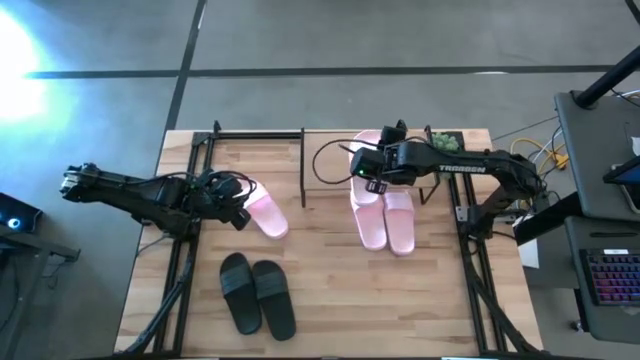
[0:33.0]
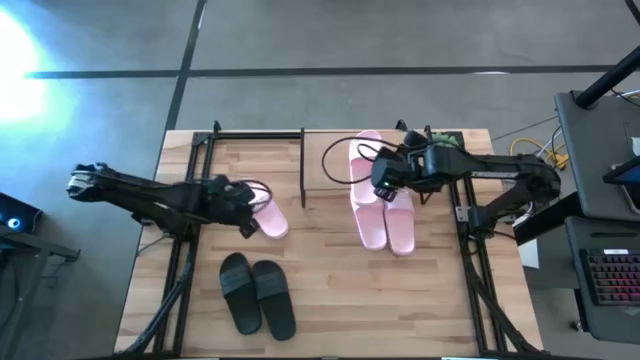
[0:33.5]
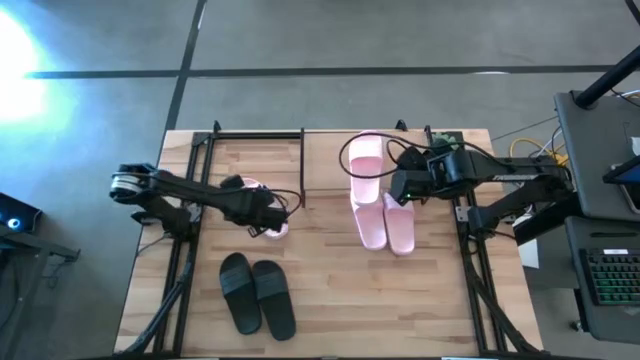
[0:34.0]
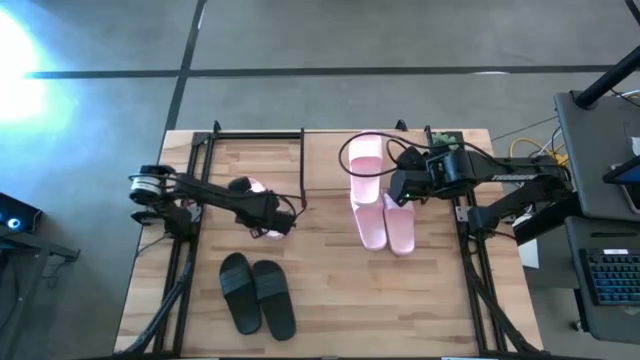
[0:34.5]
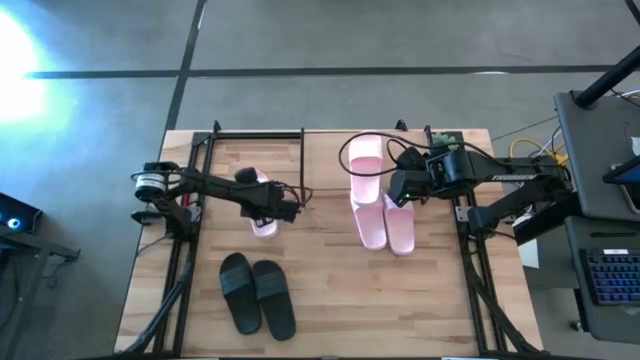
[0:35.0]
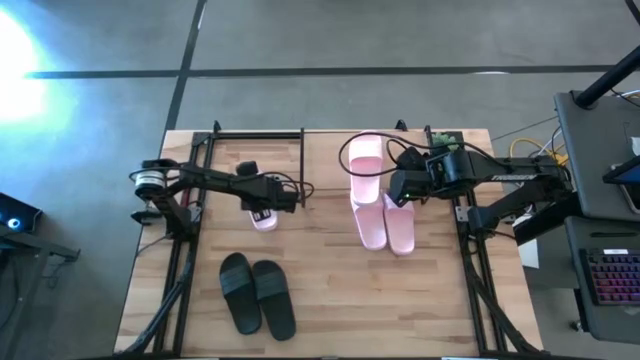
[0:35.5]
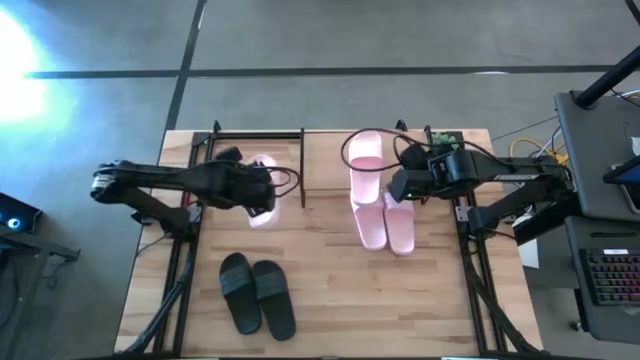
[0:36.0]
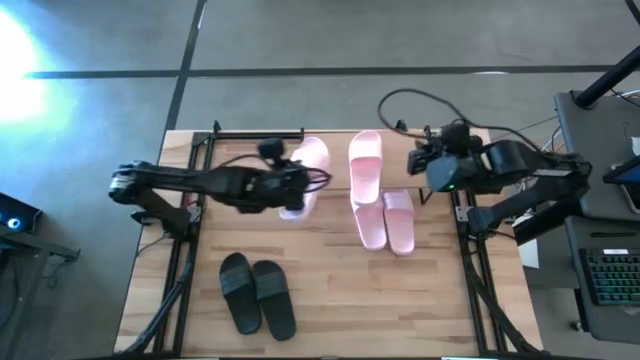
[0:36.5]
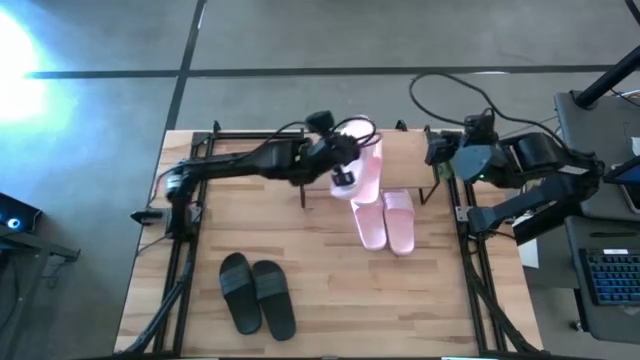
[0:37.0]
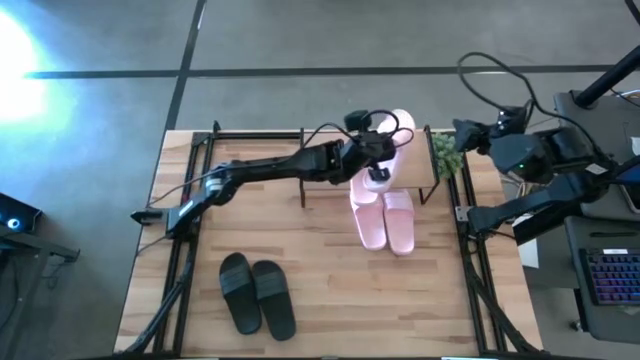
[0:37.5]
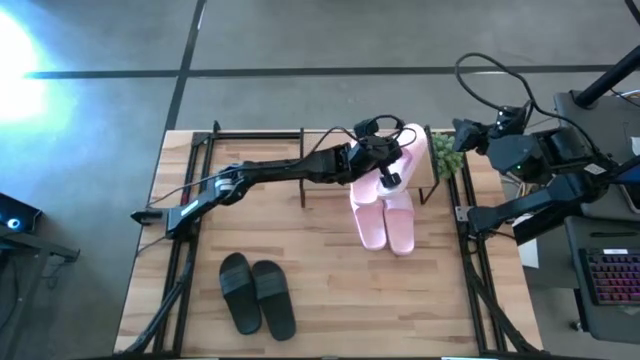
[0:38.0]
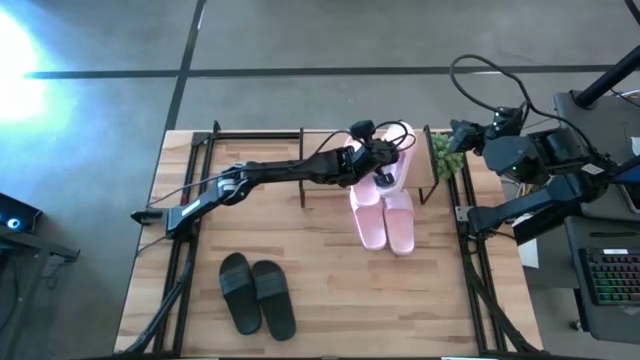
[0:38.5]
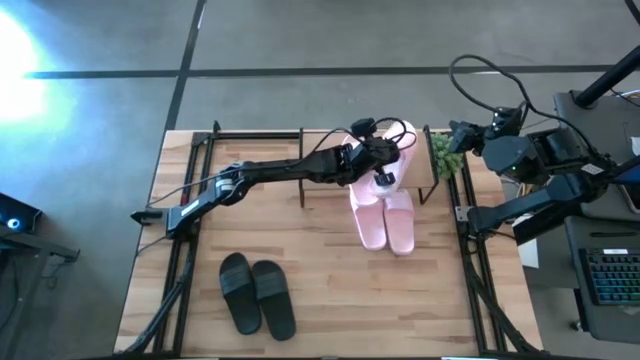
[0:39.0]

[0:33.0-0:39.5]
Task: Pick and place slides into the shelf
Put the pink slipper on the shelf

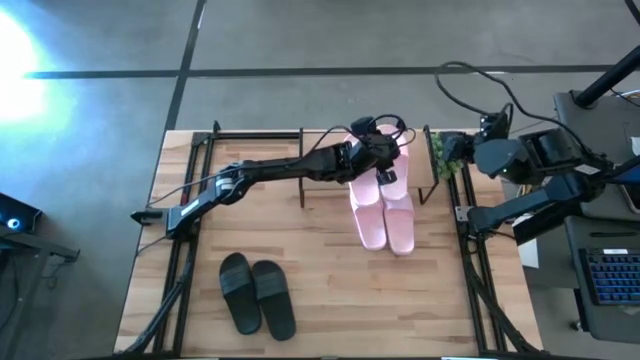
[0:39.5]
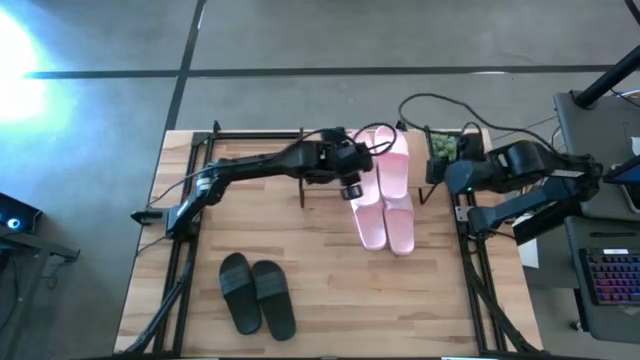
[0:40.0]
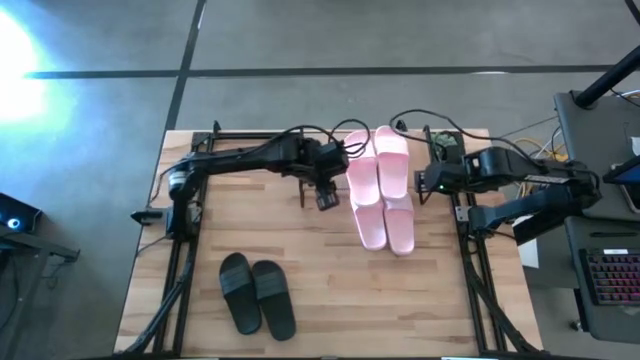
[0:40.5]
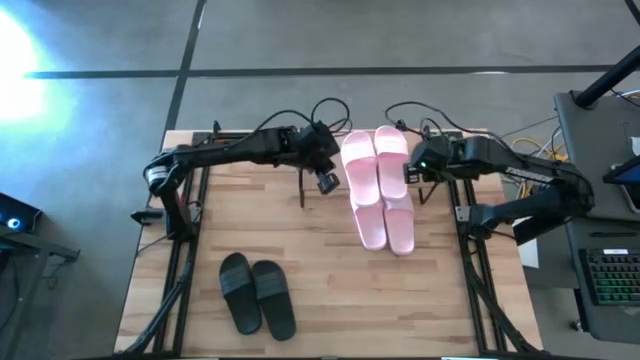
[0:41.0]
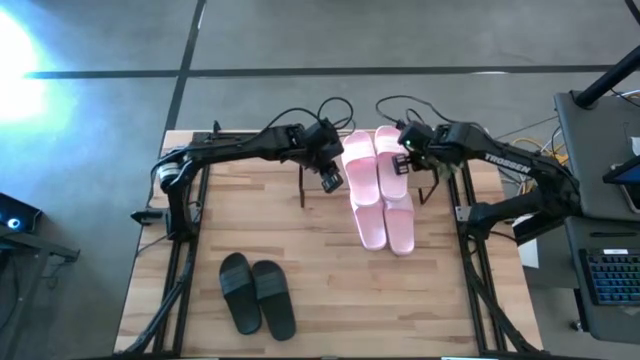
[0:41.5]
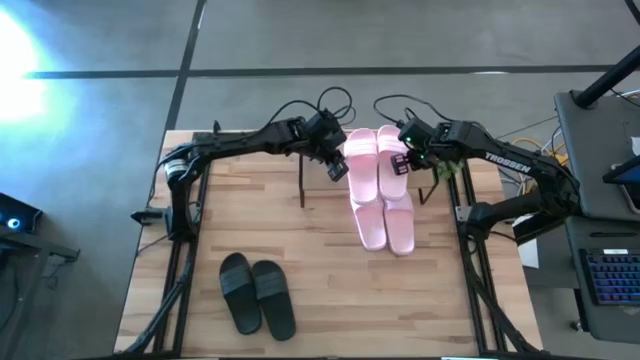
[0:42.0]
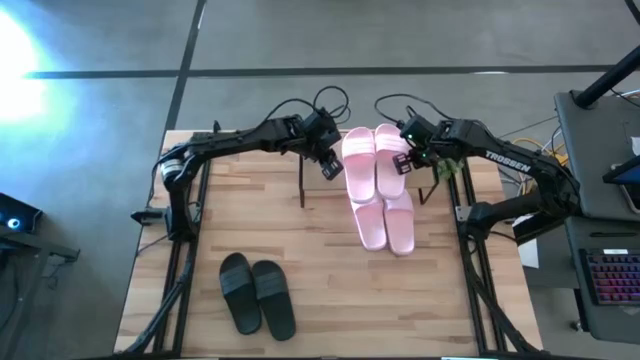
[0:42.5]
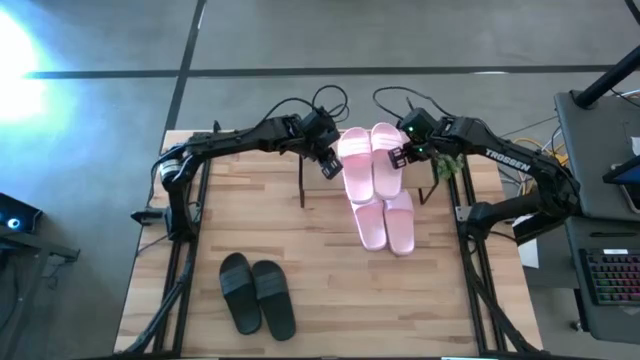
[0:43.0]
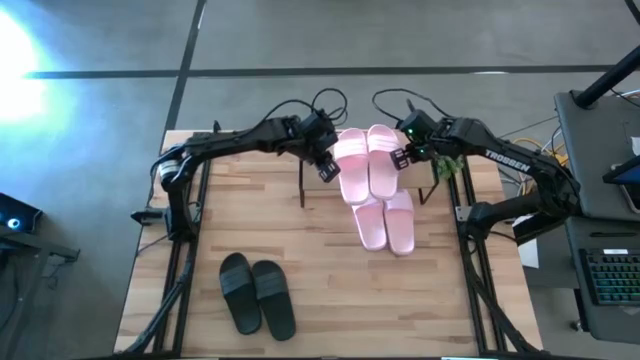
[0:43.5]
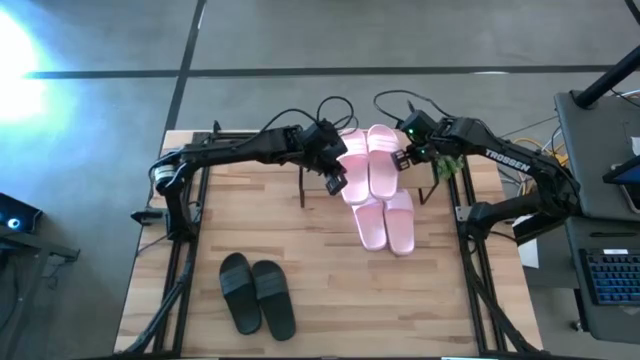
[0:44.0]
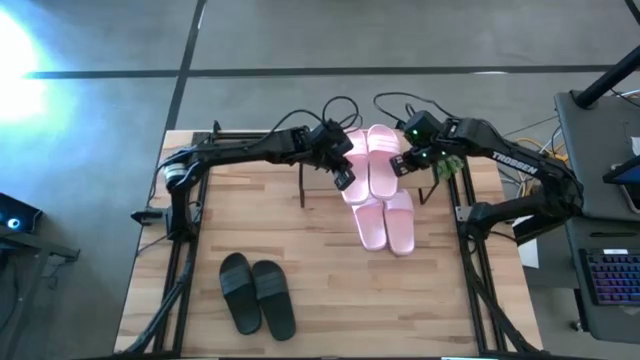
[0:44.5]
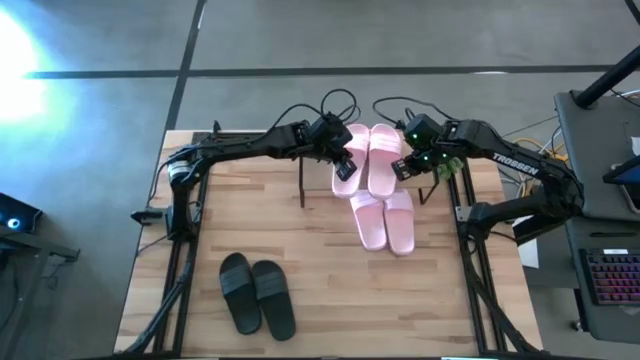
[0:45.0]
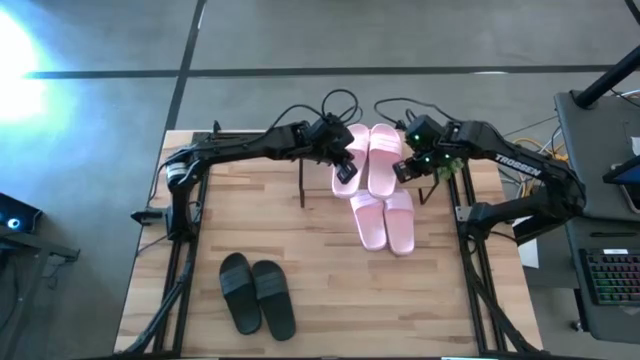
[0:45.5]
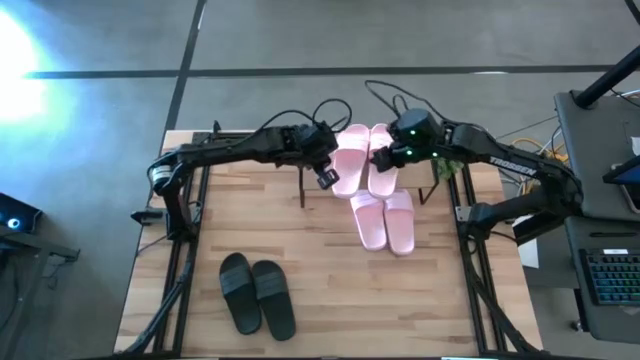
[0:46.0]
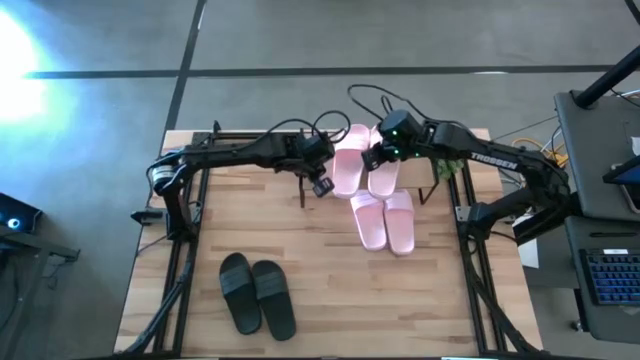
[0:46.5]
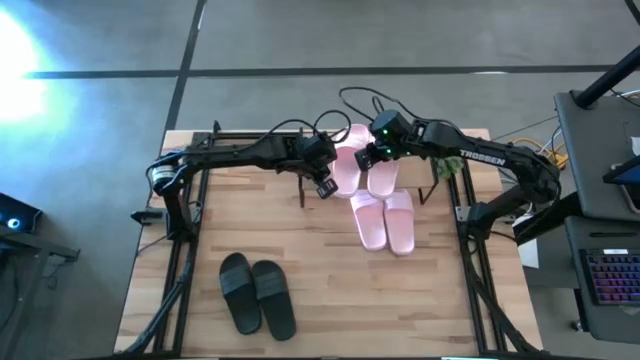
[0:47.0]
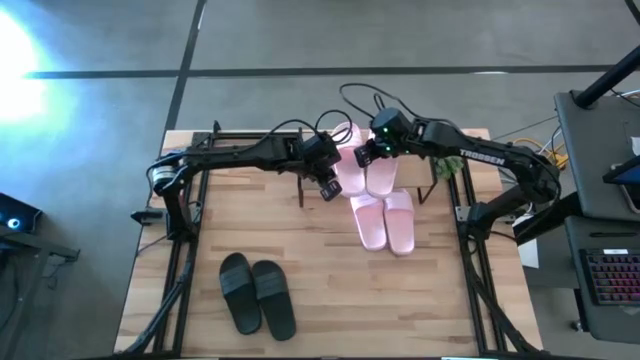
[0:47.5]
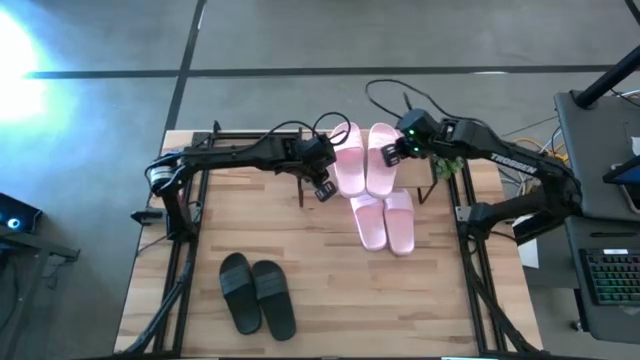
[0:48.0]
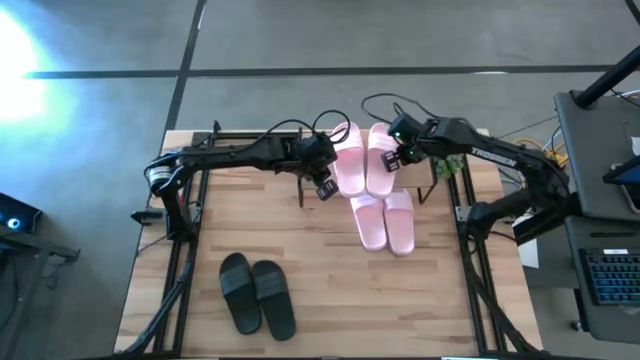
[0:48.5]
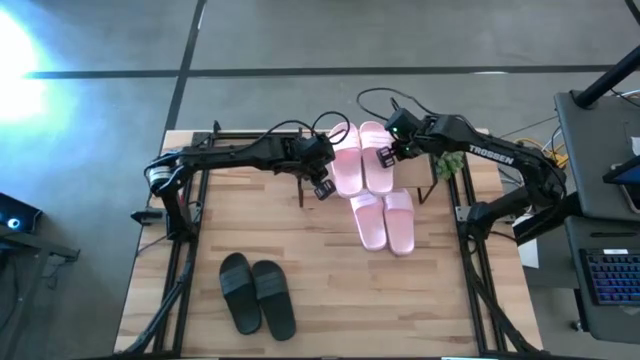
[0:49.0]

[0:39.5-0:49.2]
Adjust the pink slippers on the shelf

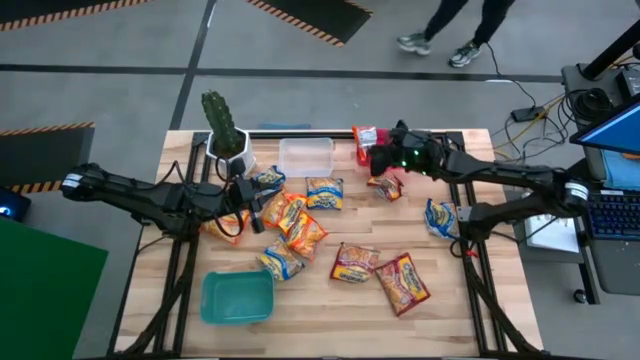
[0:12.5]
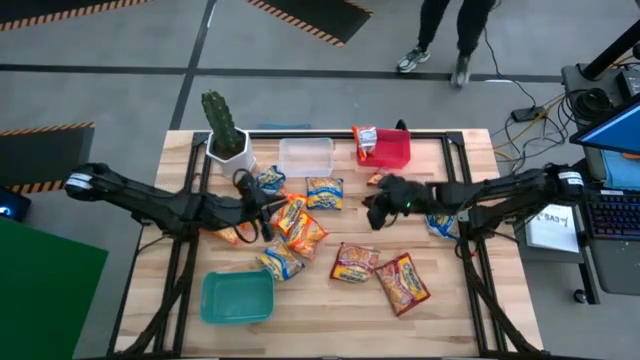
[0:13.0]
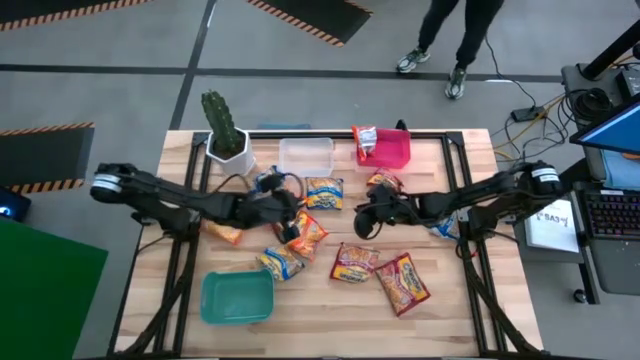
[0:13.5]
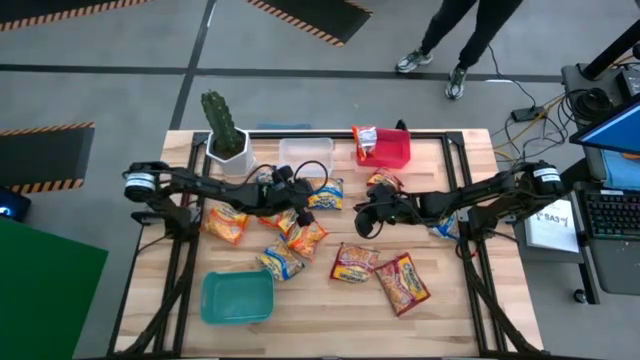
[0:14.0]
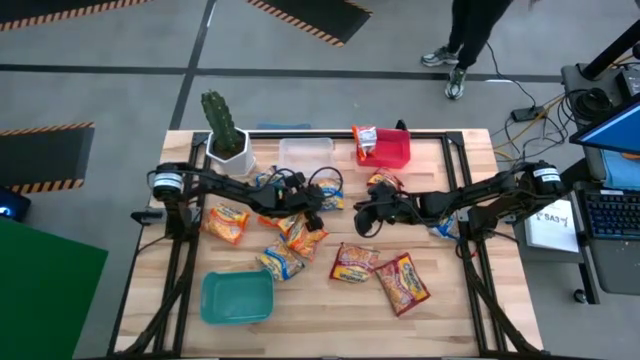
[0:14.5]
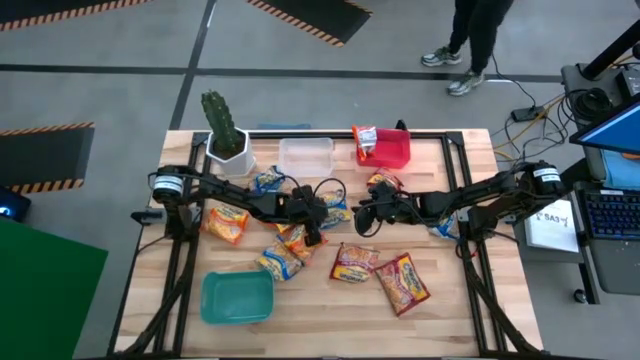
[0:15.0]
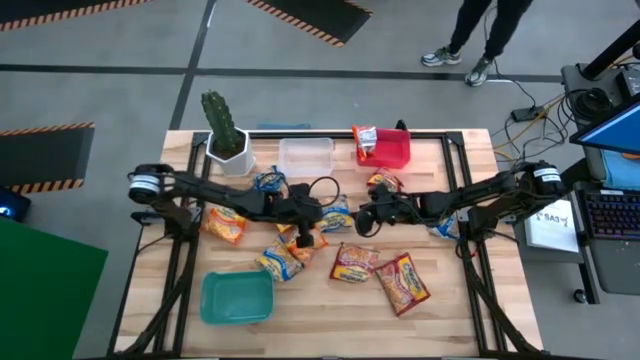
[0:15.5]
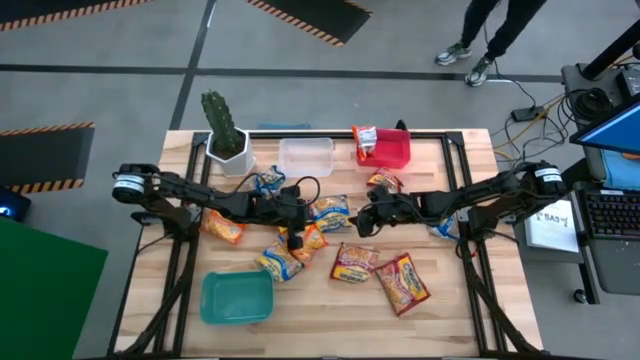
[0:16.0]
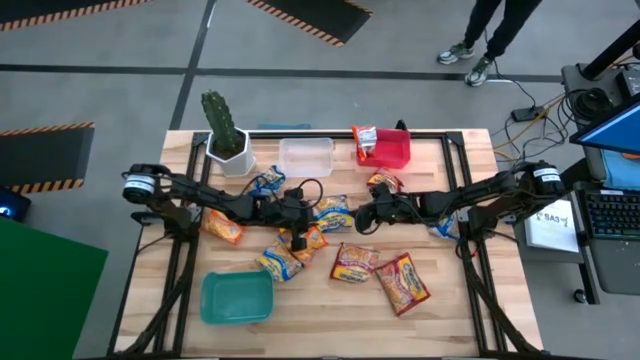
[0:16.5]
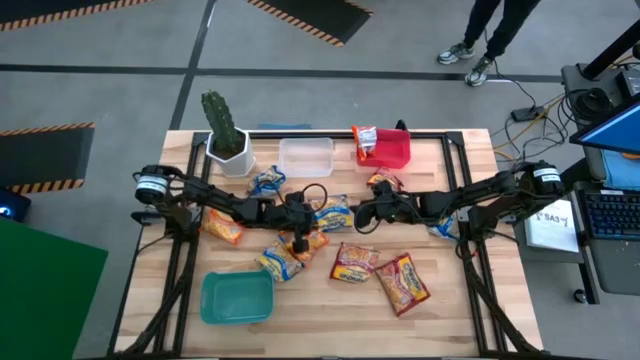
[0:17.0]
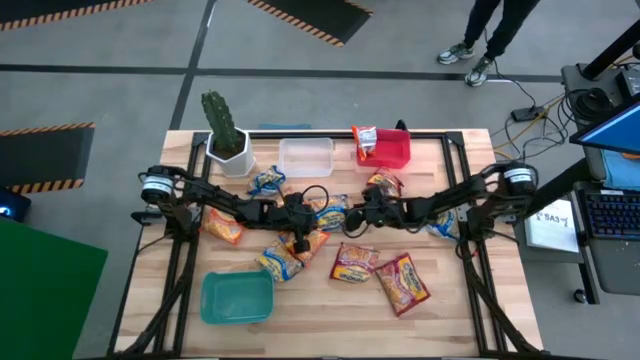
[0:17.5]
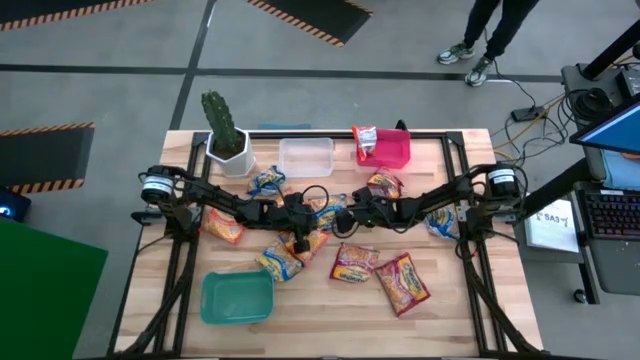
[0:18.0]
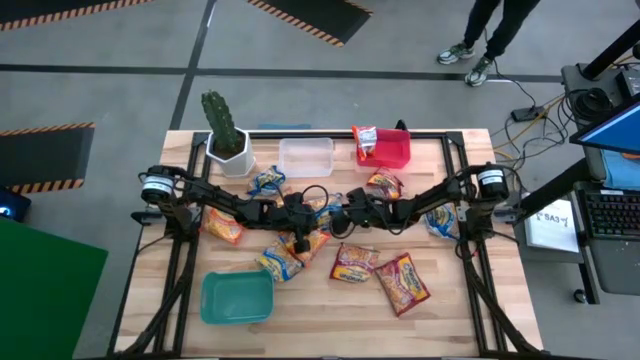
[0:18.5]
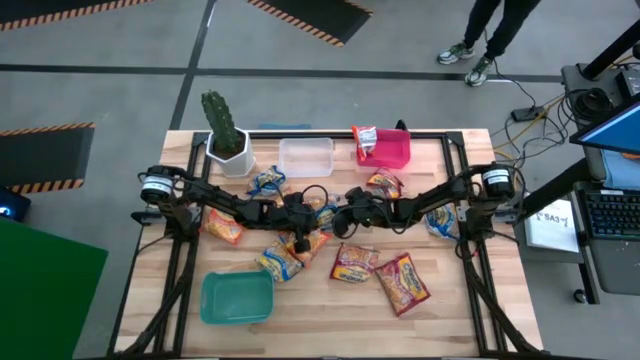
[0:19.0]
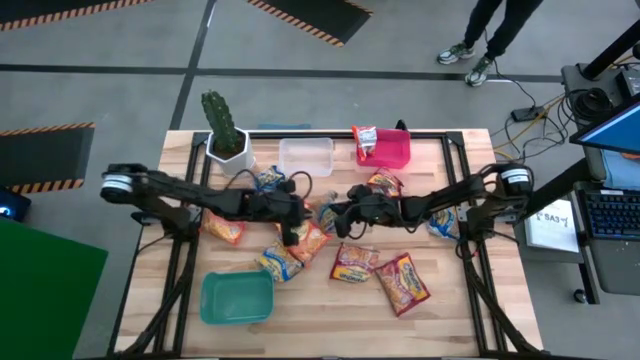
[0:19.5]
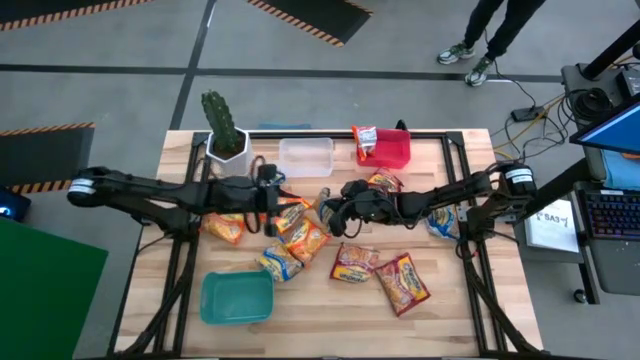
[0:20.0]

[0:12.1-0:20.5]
Task: Sort Maruchan noodles
Put the blue noodle pack into the white bin
